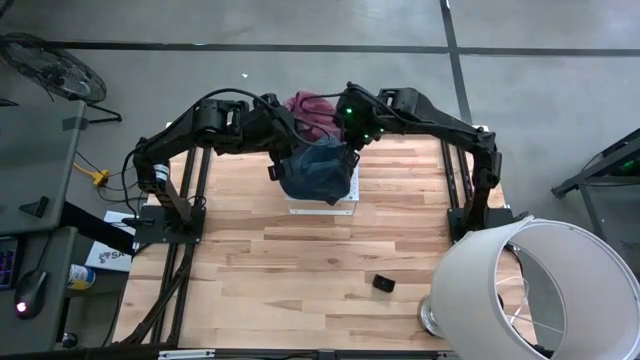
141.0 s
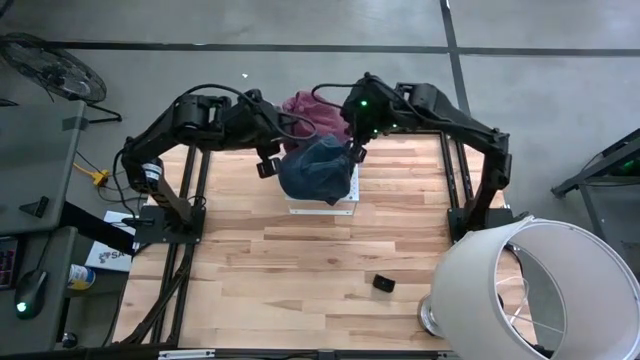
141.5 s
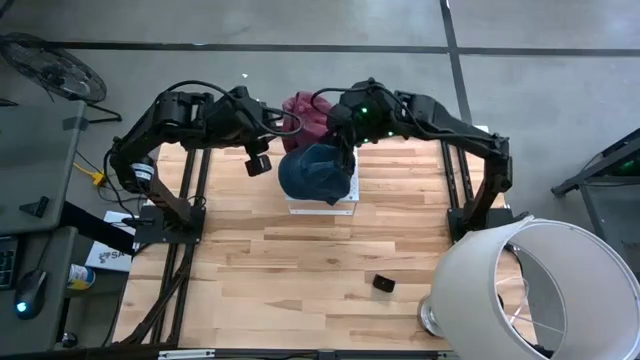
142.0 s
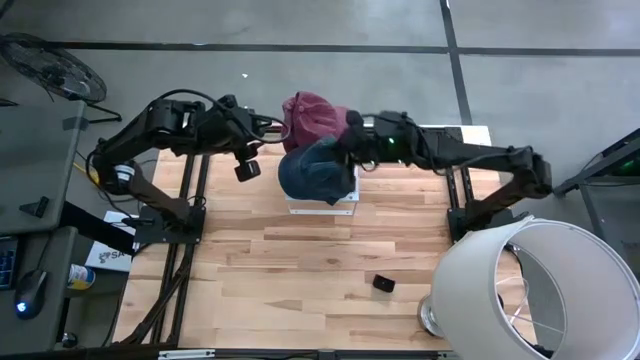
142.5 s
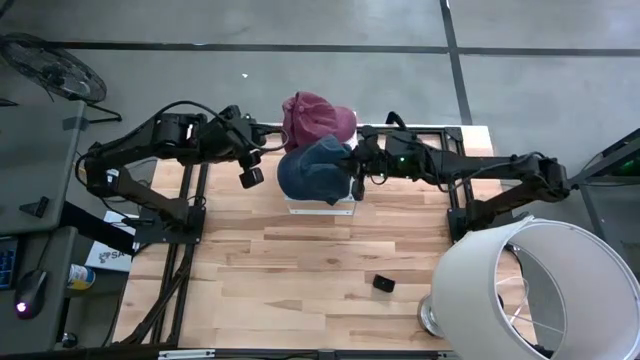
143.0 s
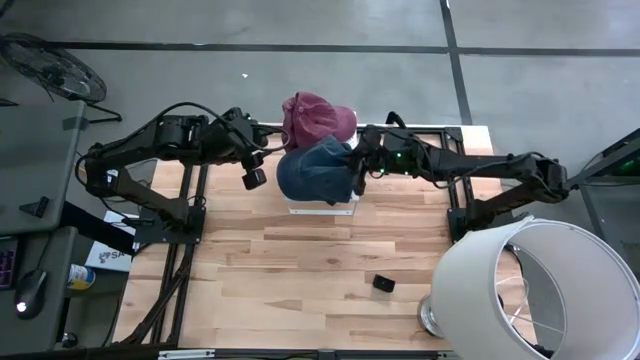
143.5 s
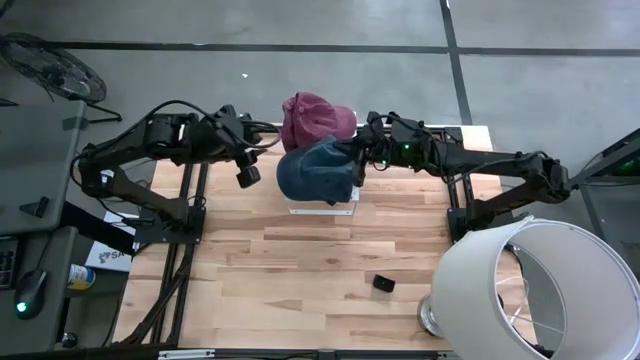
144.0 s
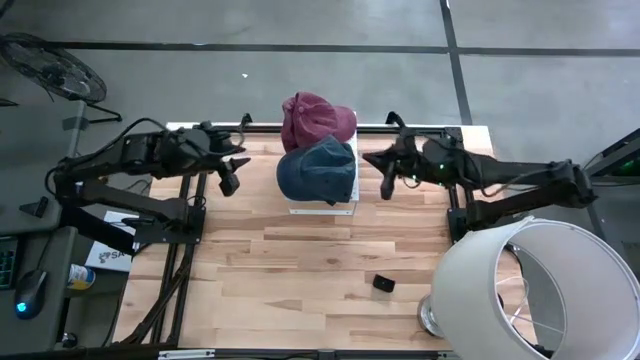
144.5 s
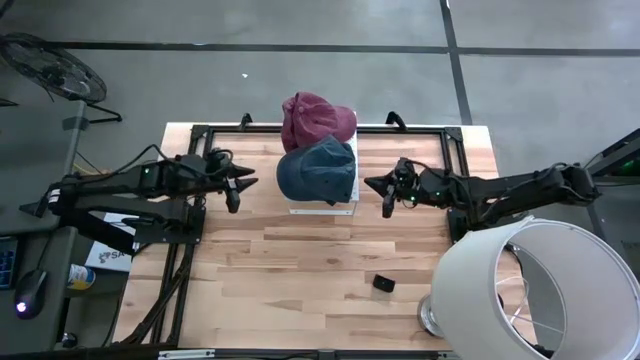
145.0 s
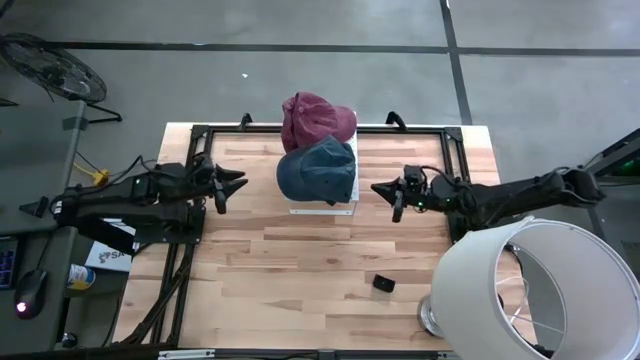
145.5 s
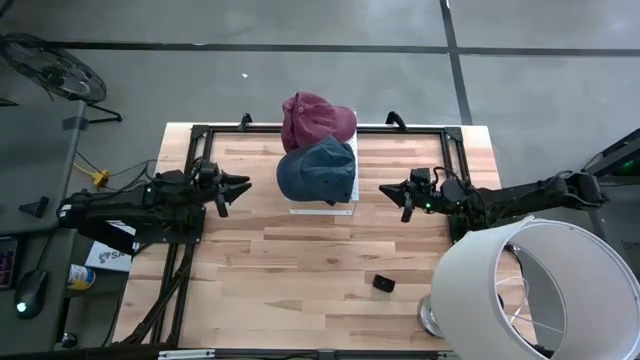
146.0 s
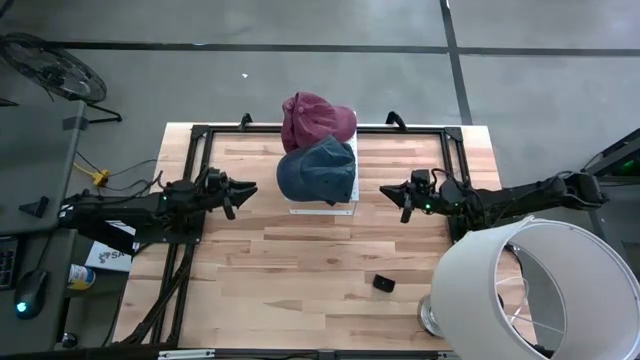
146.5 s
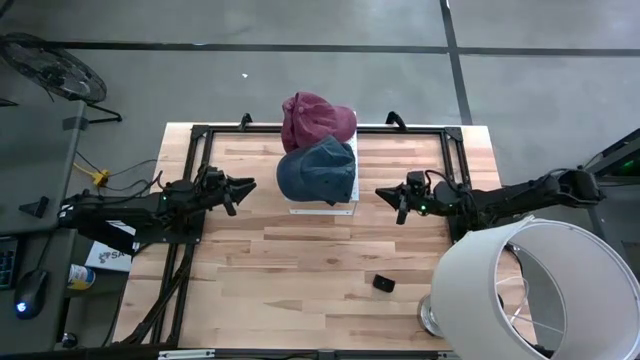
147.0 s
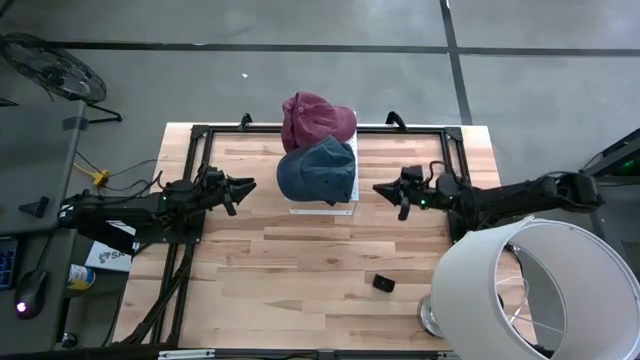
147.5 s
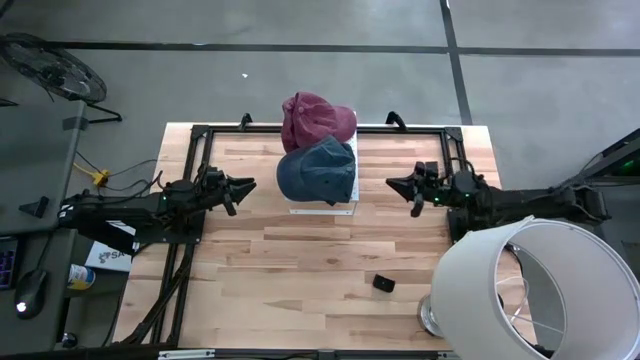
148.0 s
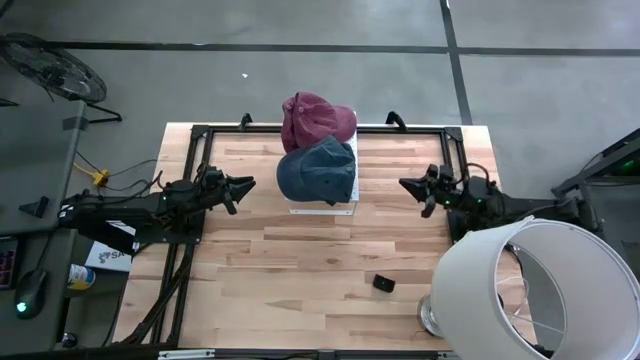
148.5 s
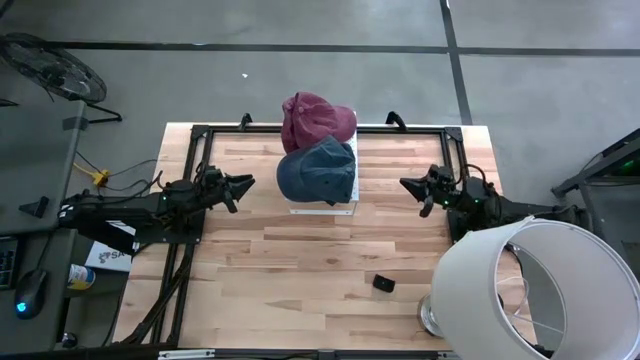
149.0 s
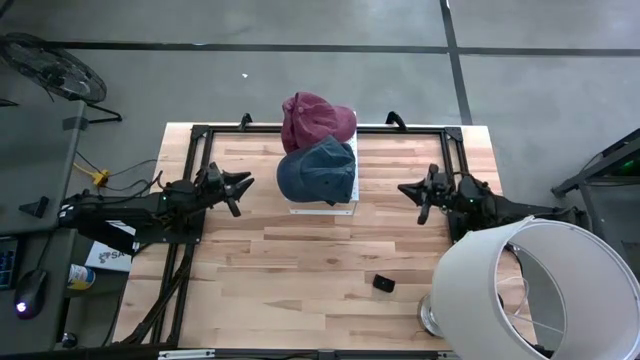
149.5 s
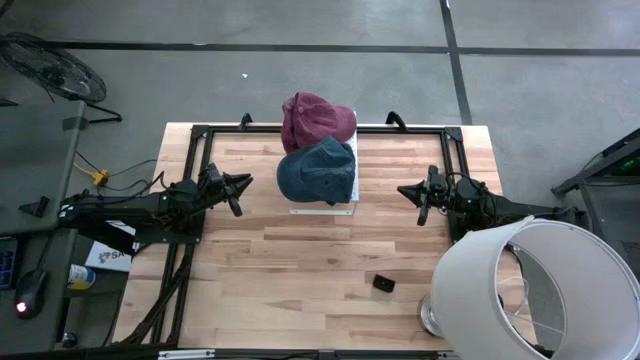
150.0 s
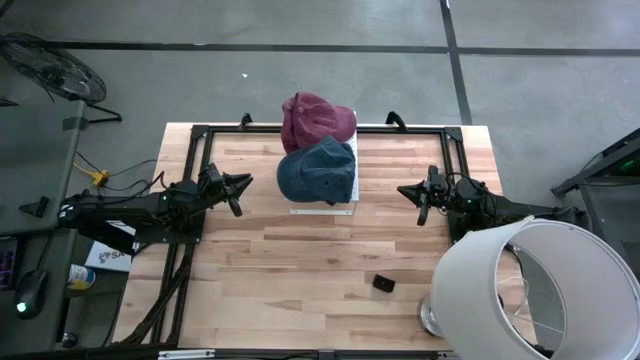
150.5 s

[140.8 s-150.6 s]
Task: Pick & Place hat
Return to Home Position
